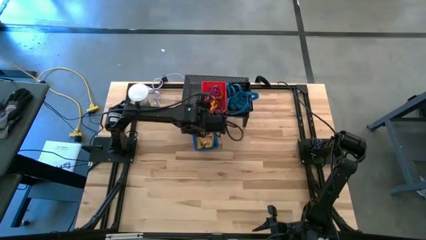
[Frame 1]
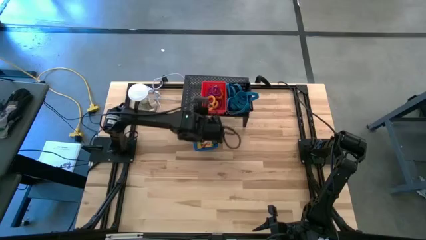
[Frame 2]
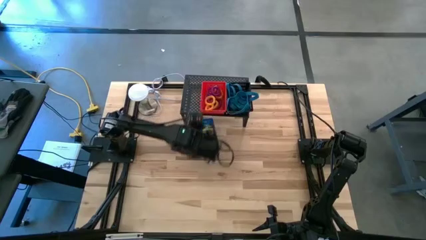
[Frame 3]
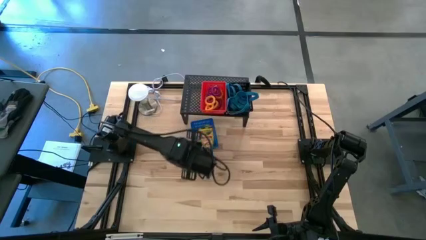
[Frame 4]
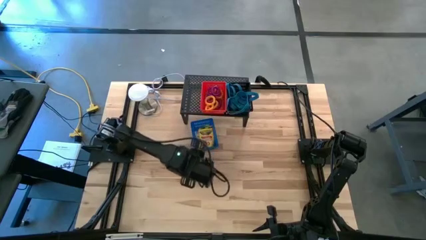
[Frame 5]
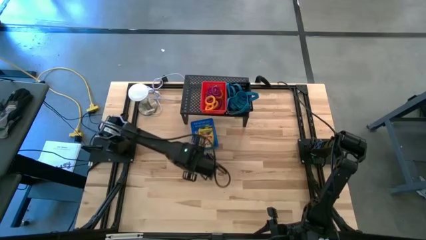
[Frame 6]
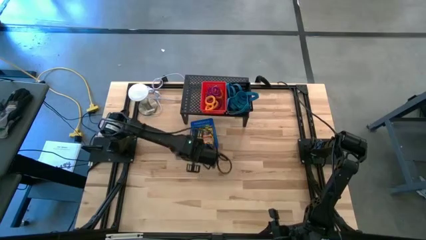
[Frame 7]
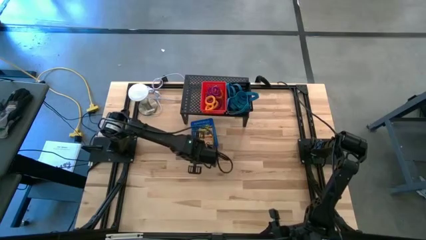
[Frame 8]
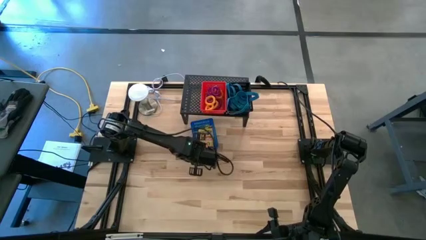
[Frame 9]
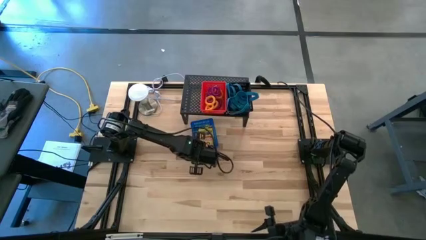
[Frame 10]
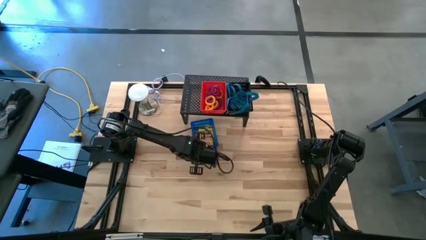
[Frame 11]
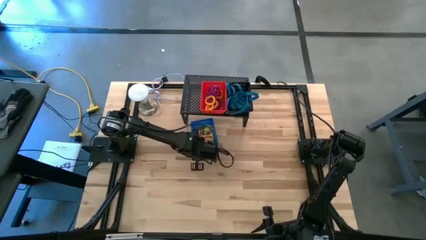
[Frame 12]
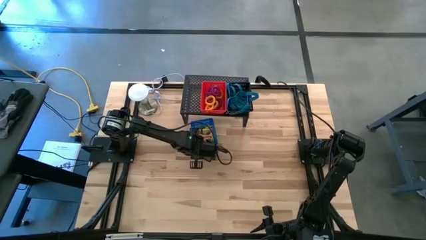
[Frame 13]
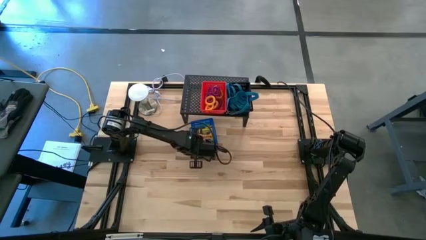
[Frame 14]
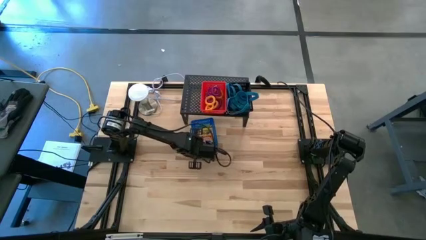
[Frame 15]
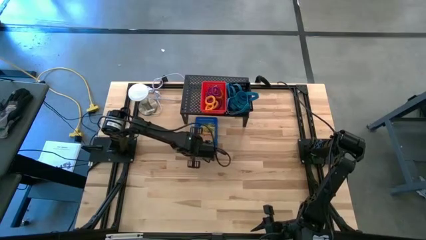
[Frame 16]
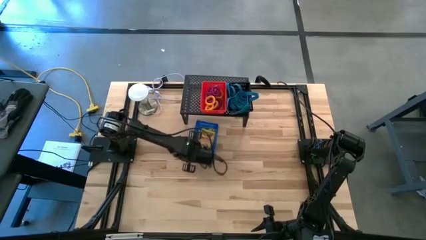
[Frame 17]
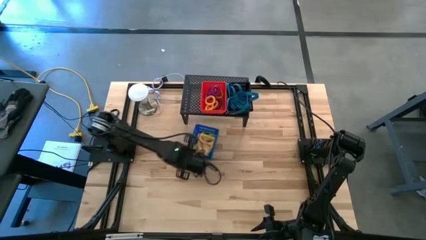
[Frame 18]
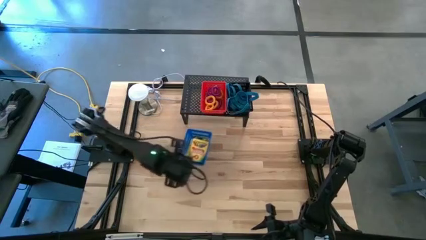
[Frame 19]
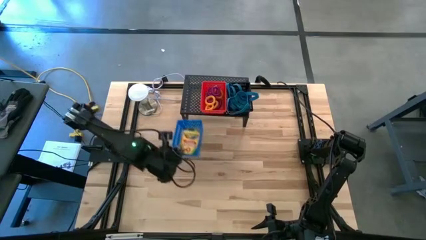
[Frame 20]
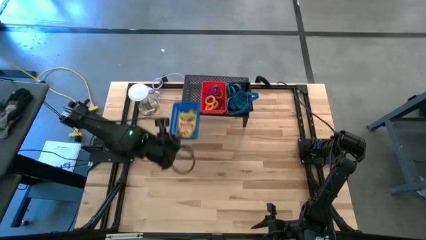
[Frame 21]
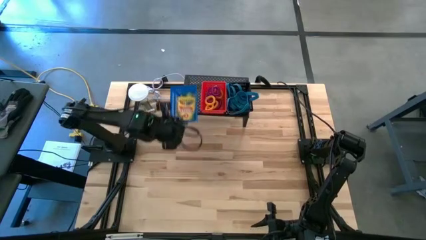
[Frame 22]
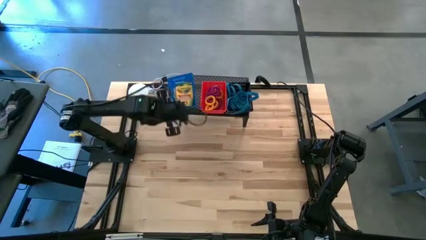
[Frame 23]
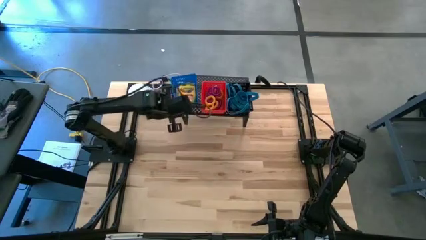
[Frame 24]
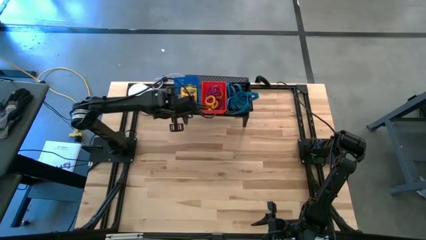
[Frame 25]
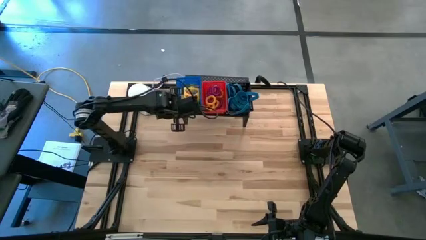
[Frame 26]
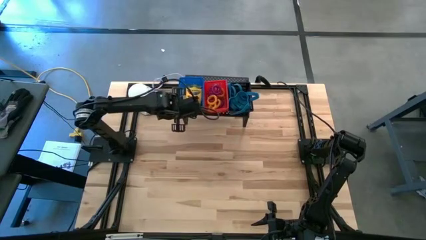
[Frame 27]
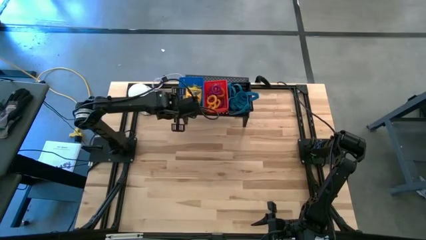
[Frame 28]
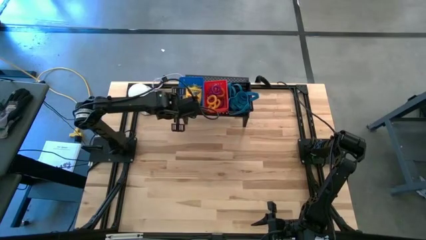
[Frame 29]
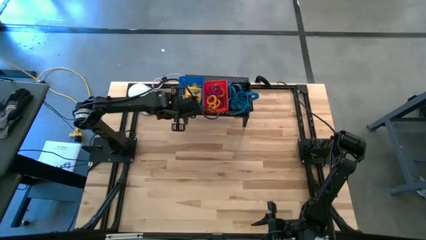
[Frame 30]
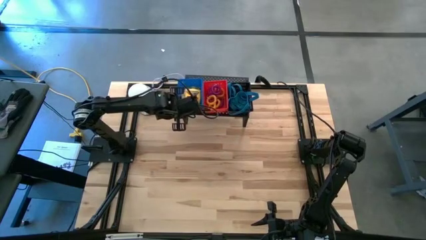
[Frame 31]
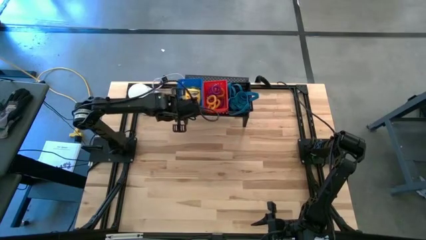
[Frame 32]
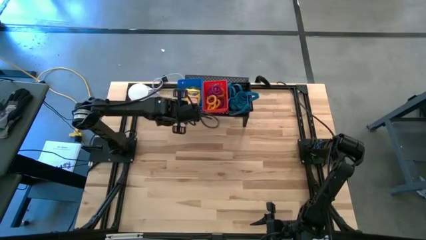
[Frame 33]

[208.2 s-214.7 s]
Task: Pick & Place Office Desk Supplies
Put the blue bin on the shelf

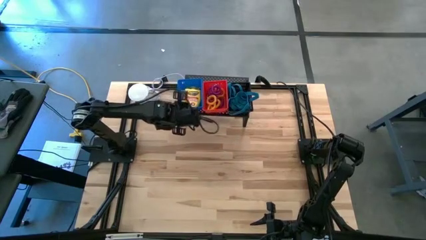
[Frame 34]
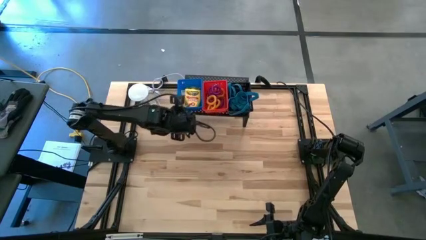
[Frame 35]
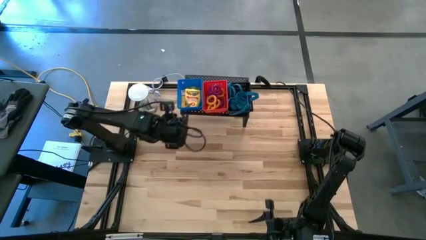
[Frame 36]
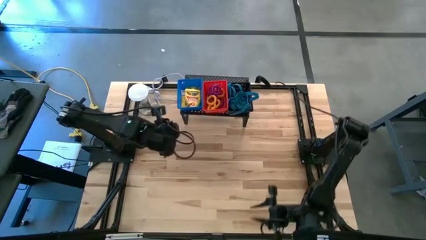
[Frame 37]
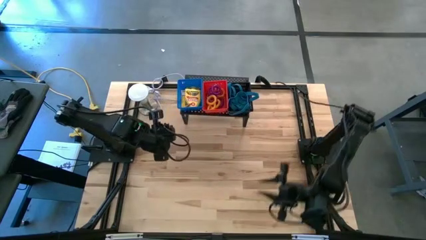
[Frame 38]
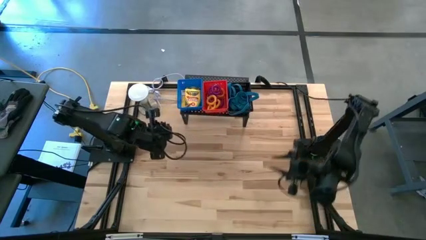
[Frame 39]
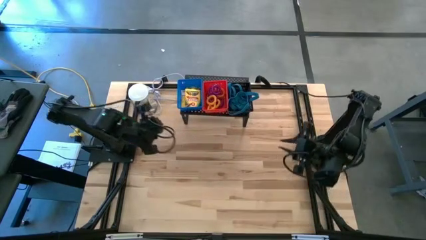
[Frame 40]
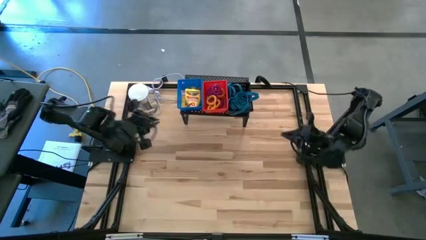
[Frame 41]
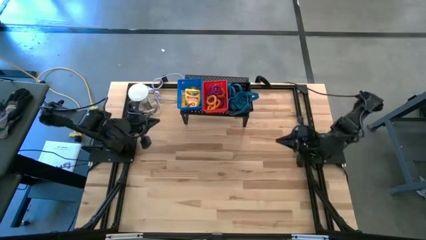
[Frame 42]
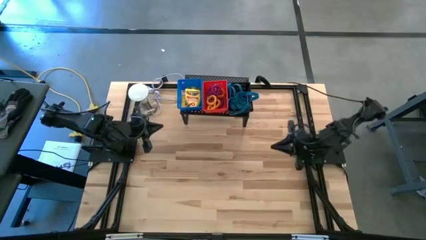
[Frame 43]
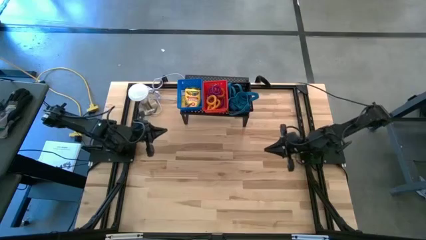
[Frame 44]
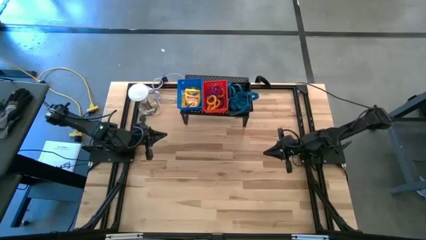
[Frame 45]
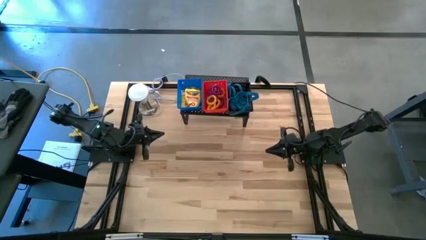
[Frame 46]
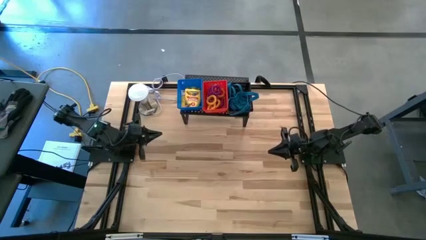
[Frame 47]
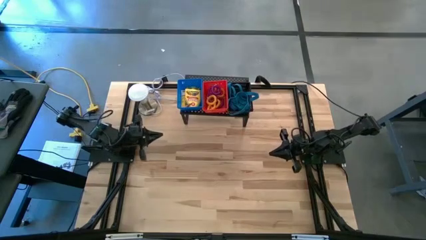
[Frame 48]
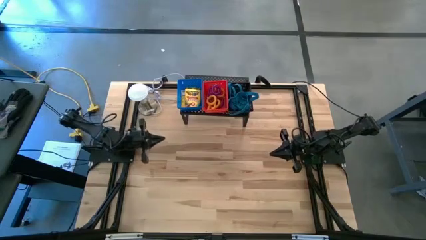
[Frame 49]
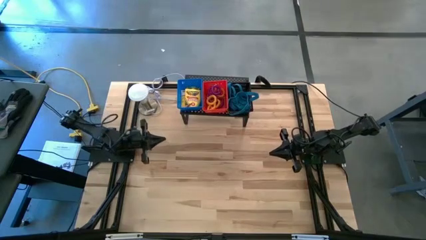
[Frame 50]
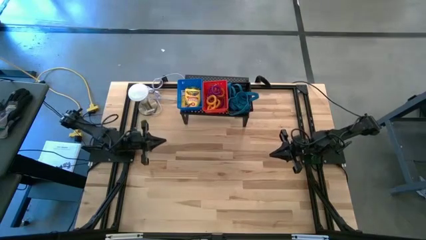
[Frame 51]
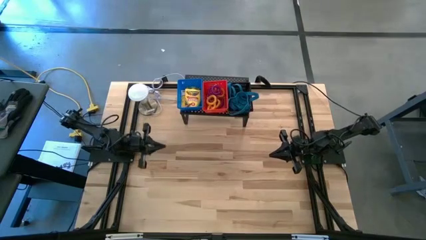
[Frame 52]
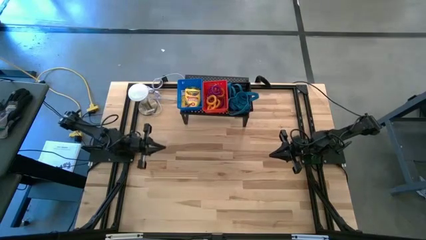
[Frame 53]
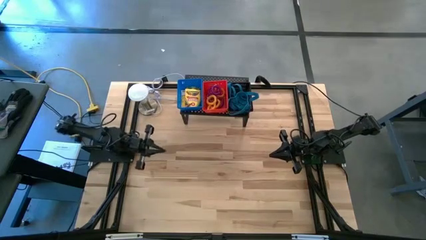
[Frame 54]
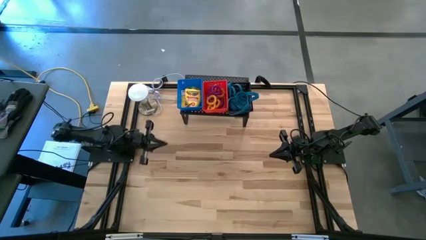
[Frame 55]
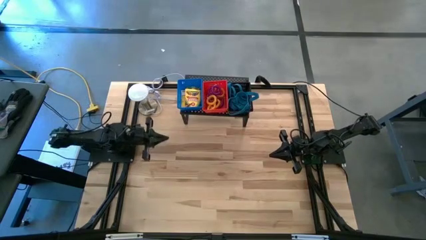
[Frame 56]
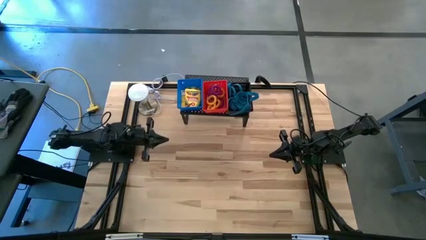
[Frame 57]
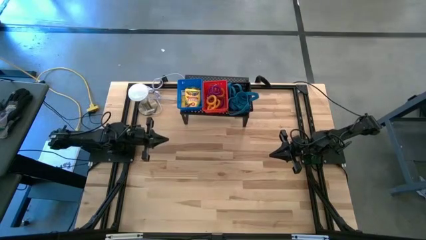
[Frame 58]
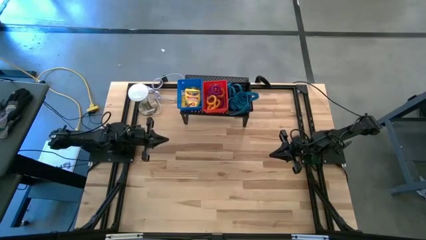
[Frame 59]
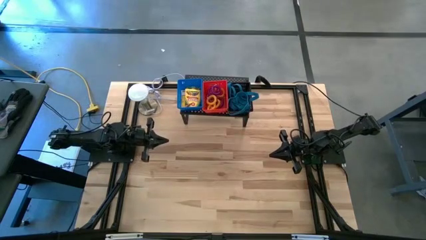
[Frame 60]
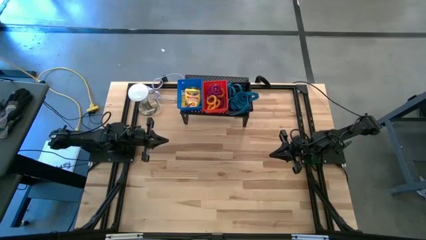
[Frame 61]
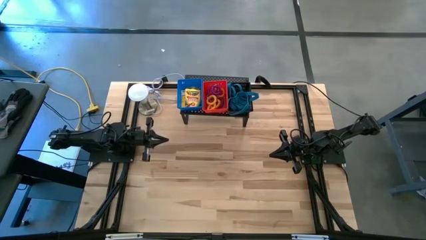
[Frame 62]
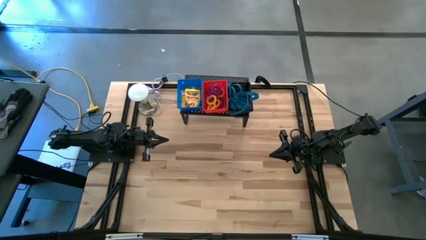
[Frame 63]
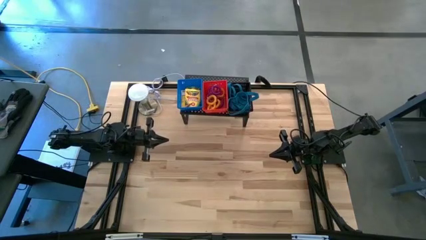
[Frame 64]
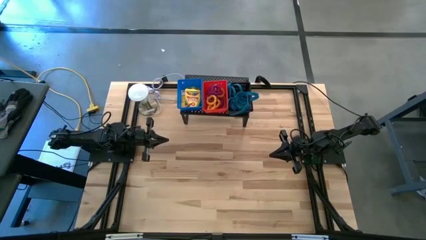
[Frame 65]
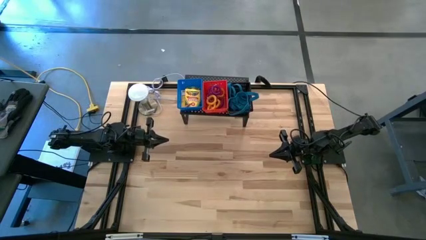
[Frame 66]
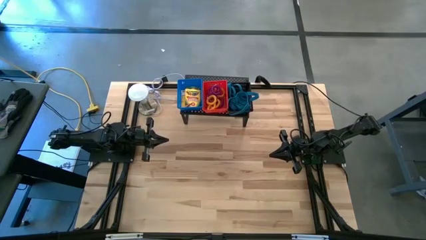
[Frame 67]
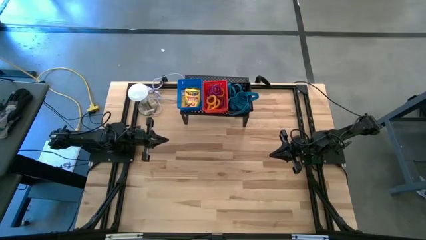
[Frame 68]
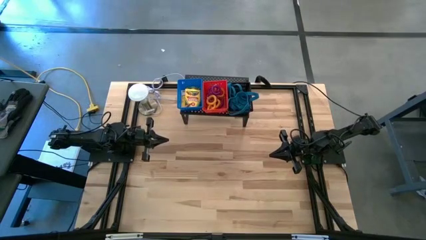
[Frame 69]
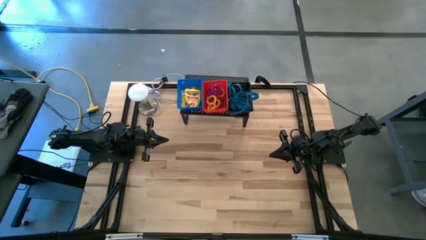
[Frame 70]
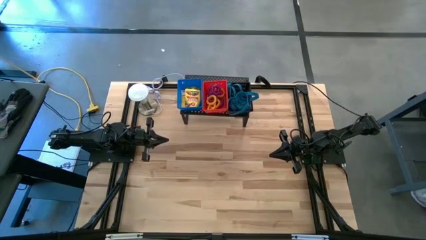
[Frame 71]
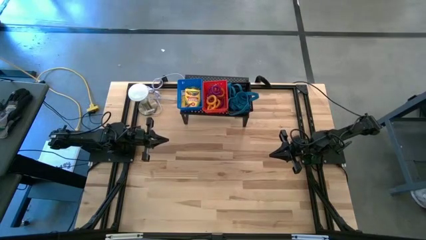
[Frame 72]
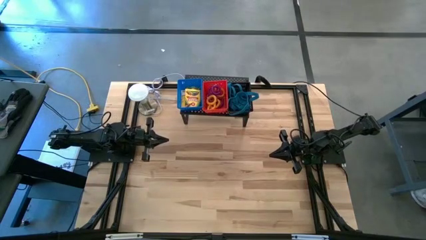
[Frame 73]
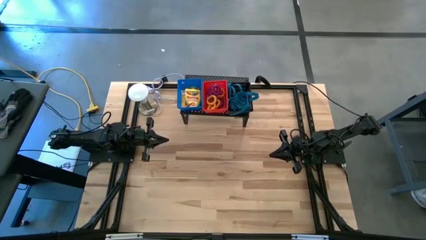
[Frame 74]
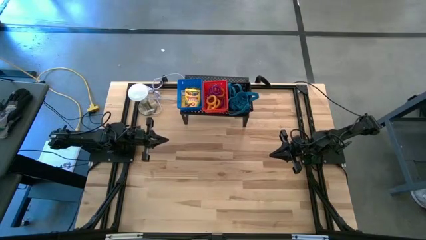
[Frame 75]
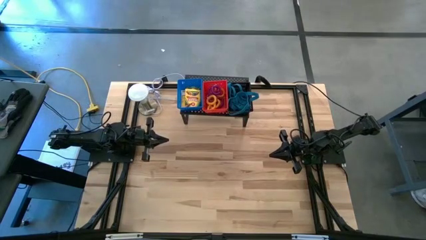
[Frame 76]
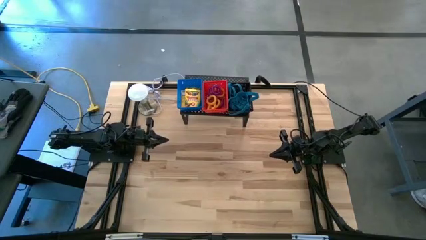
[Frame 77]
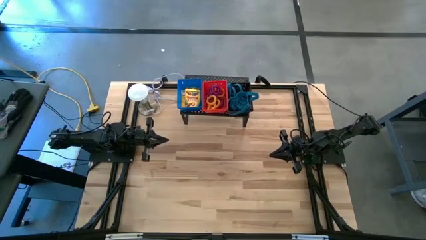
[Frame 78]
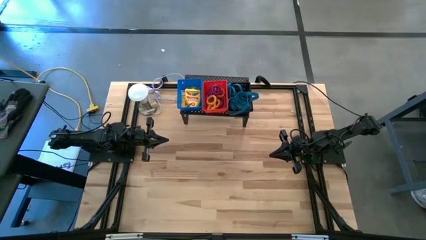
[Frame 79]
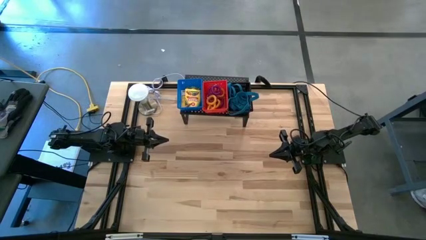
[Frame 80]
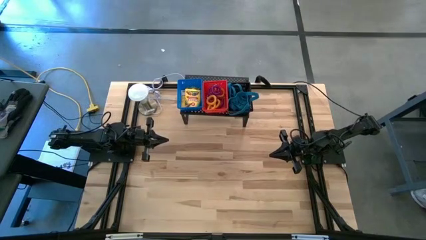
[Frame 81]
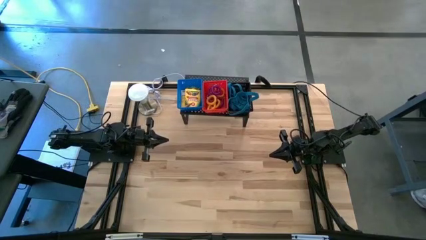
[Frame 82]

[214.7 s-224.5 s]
Return to Home Position
